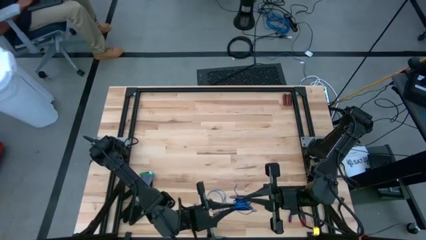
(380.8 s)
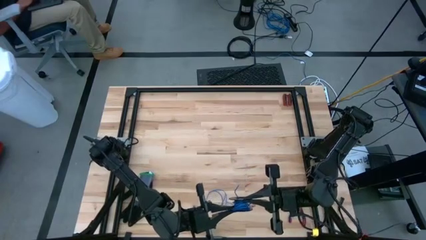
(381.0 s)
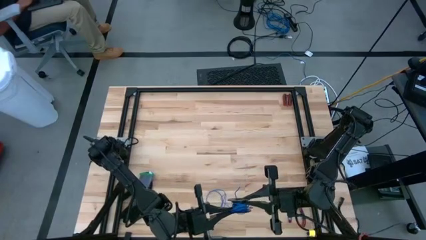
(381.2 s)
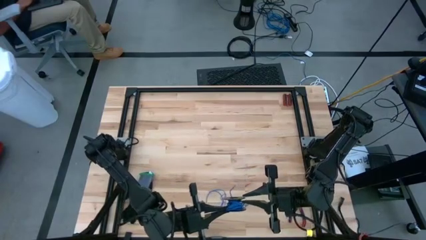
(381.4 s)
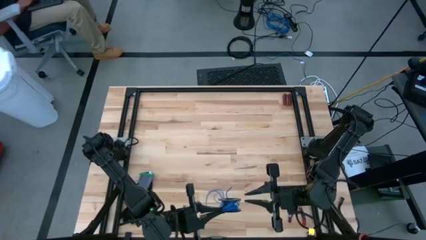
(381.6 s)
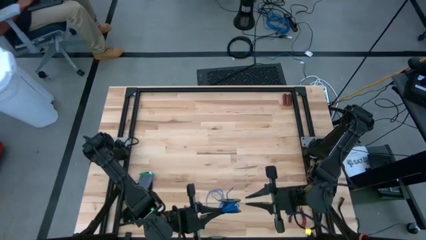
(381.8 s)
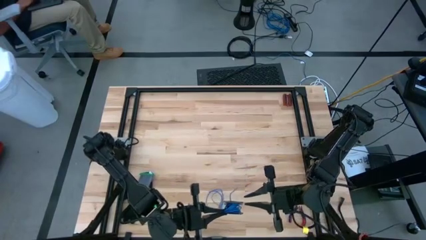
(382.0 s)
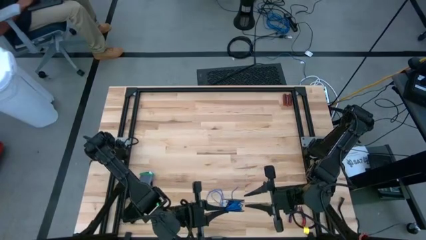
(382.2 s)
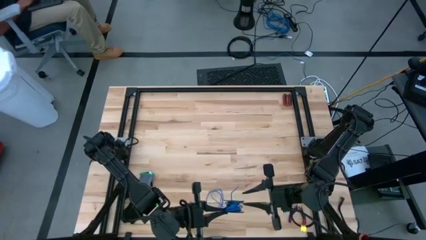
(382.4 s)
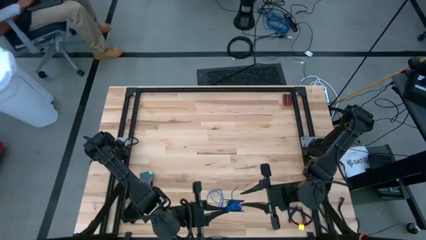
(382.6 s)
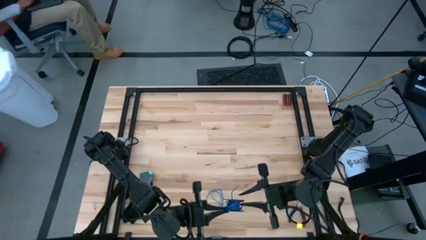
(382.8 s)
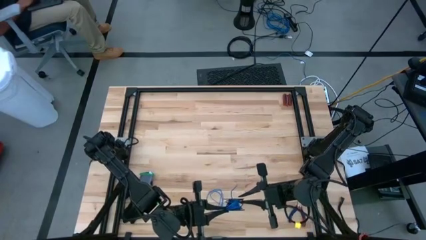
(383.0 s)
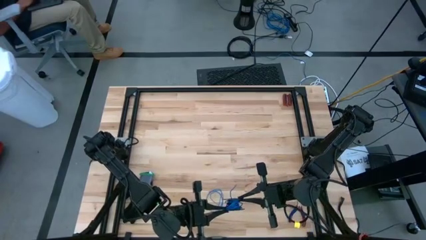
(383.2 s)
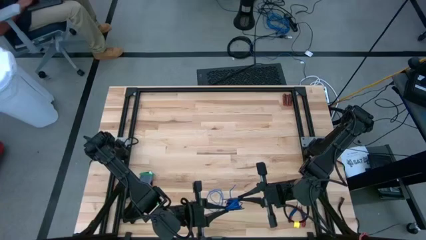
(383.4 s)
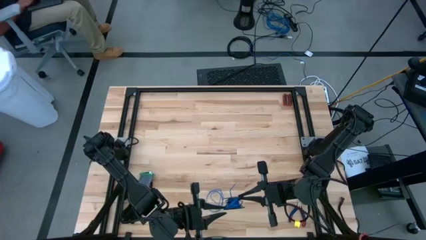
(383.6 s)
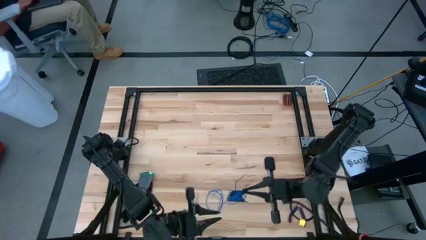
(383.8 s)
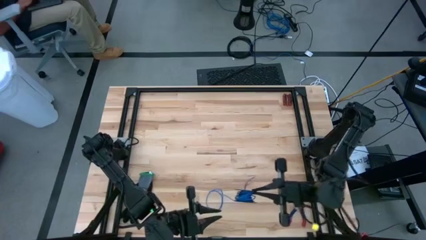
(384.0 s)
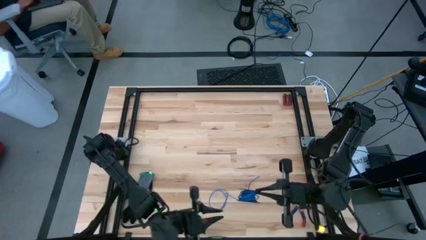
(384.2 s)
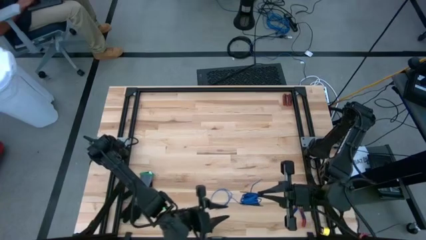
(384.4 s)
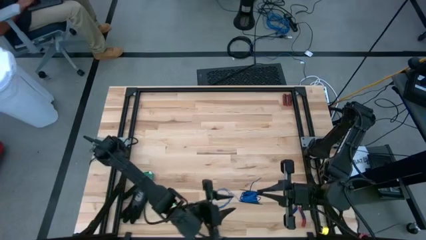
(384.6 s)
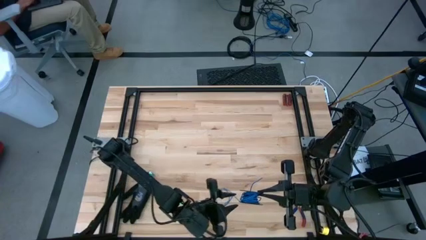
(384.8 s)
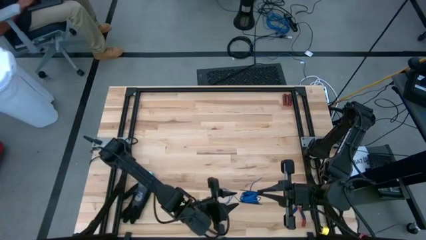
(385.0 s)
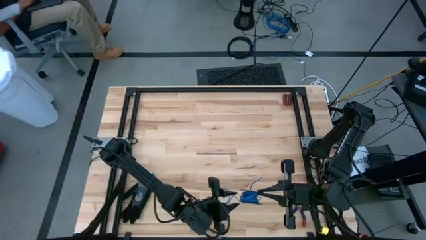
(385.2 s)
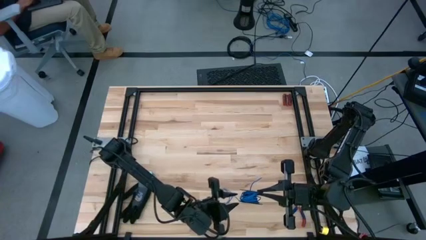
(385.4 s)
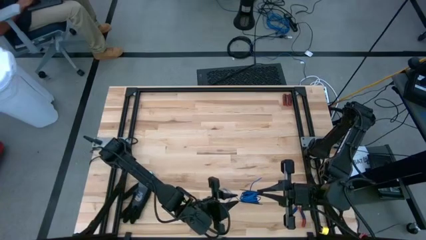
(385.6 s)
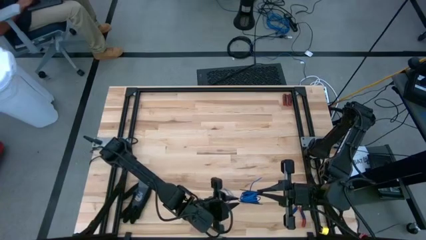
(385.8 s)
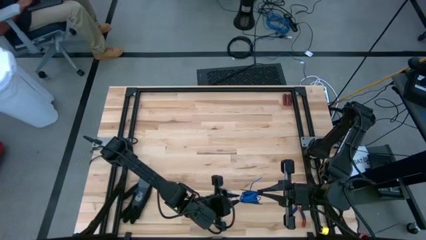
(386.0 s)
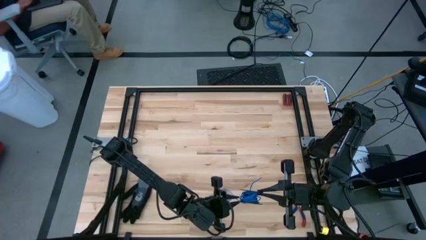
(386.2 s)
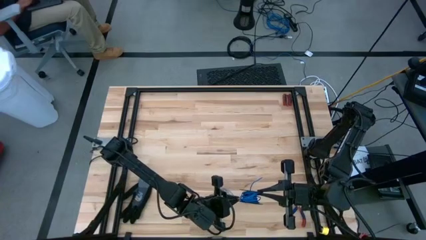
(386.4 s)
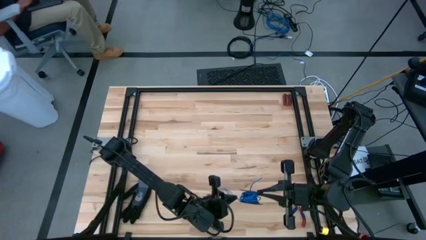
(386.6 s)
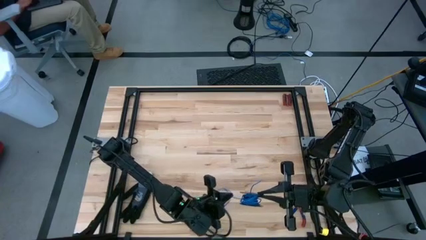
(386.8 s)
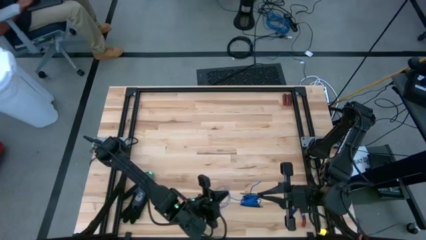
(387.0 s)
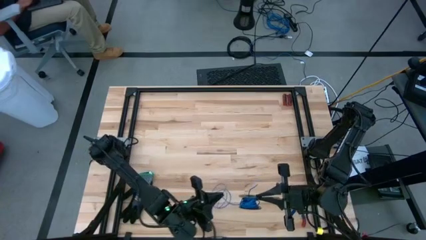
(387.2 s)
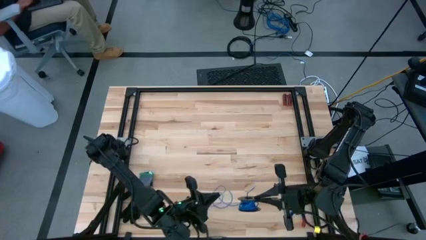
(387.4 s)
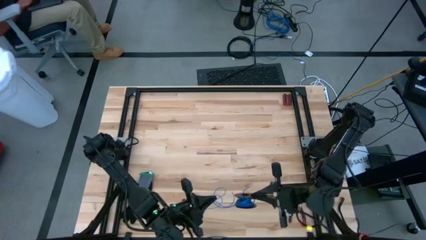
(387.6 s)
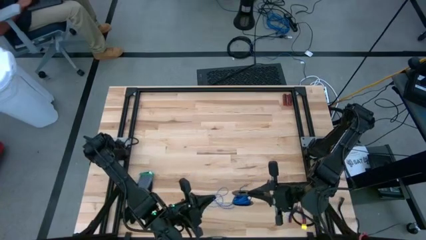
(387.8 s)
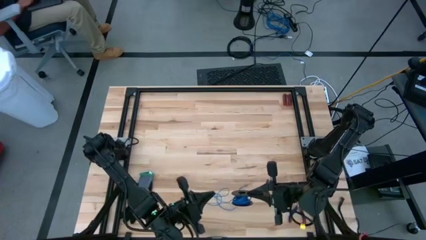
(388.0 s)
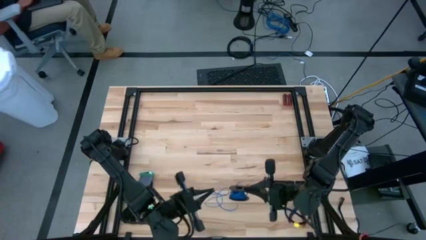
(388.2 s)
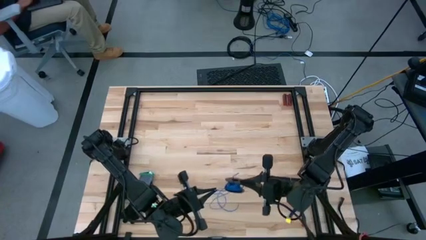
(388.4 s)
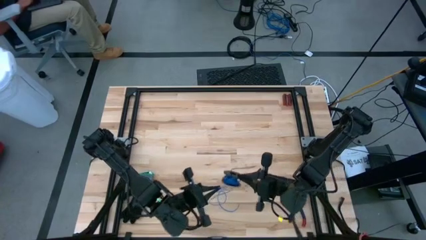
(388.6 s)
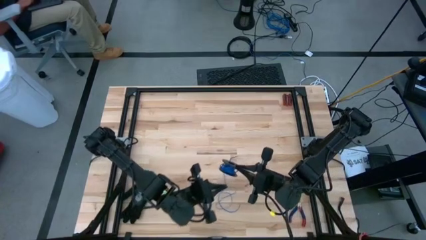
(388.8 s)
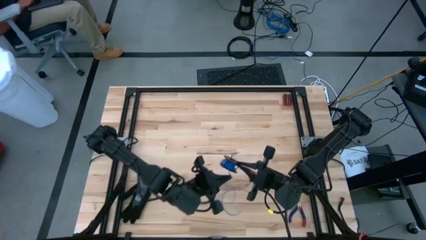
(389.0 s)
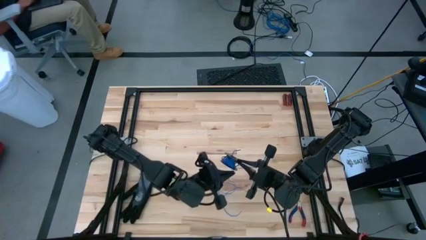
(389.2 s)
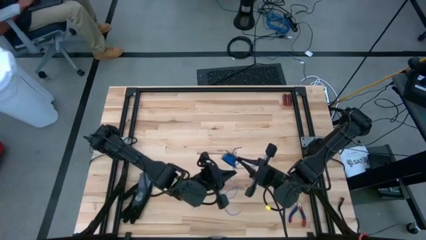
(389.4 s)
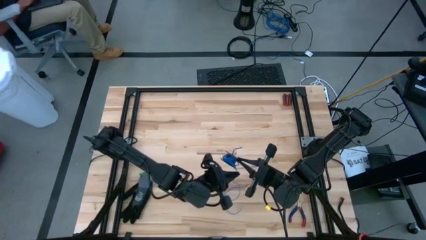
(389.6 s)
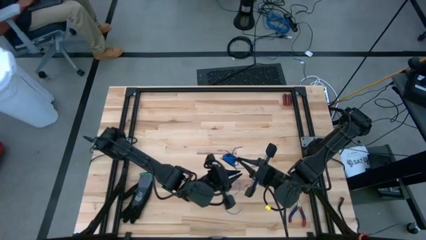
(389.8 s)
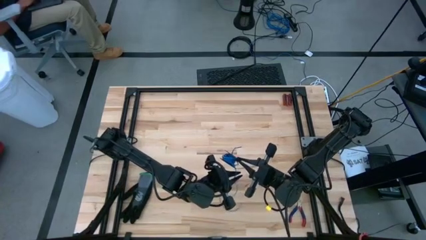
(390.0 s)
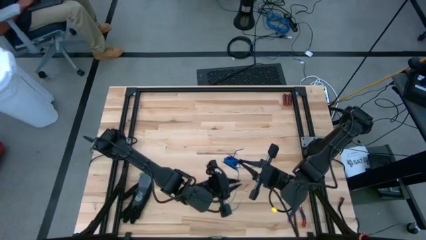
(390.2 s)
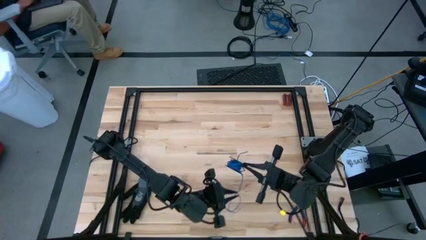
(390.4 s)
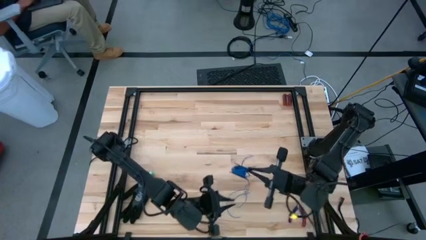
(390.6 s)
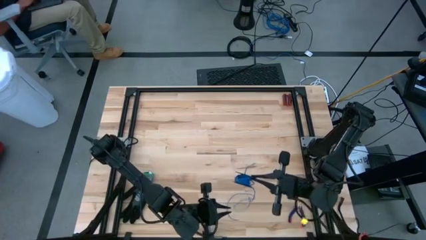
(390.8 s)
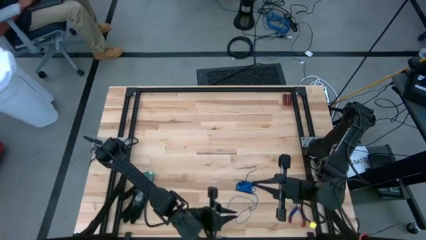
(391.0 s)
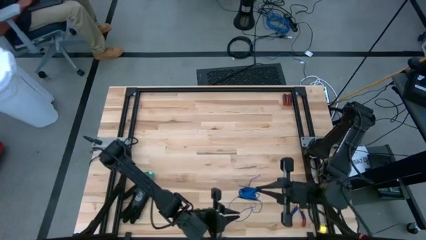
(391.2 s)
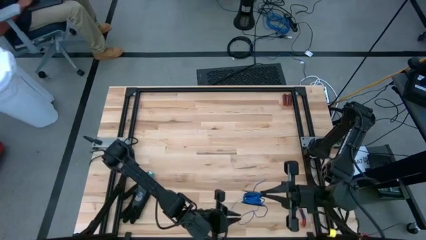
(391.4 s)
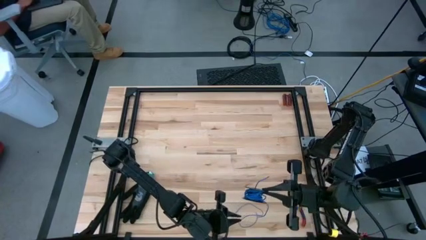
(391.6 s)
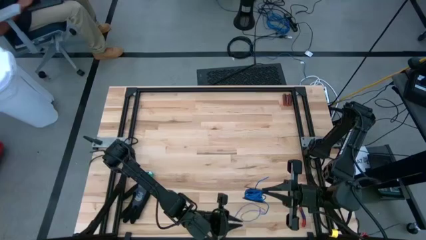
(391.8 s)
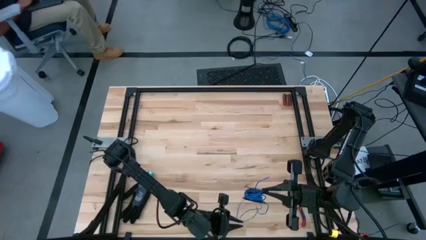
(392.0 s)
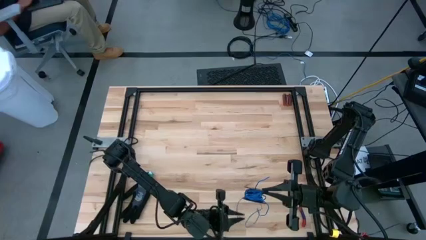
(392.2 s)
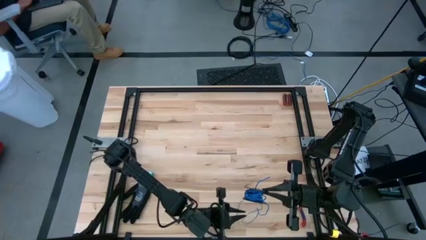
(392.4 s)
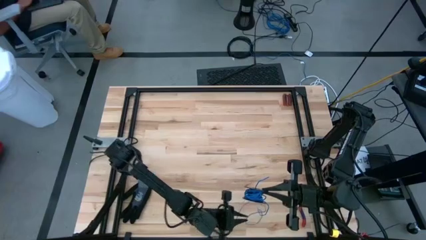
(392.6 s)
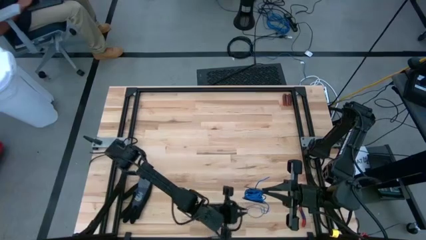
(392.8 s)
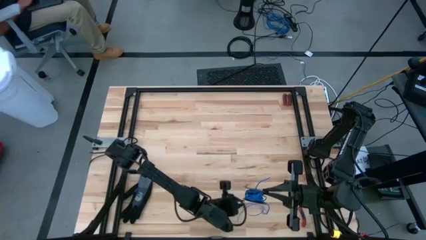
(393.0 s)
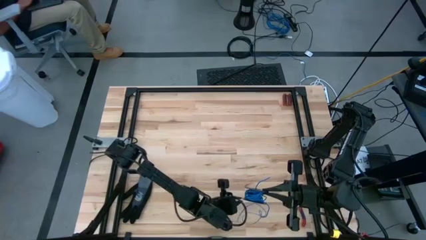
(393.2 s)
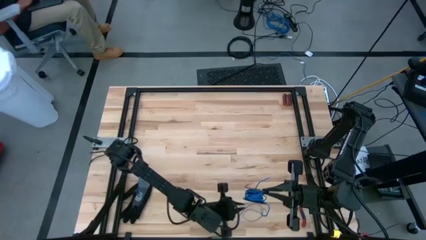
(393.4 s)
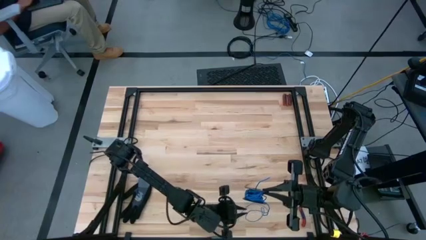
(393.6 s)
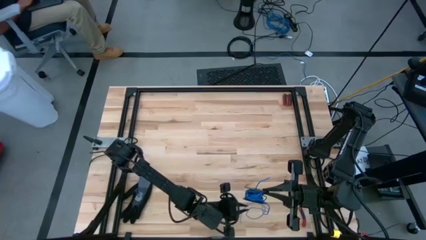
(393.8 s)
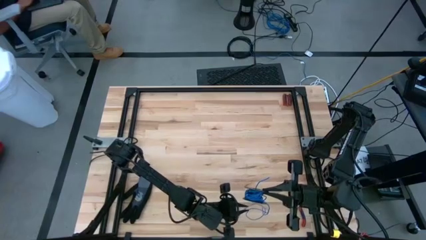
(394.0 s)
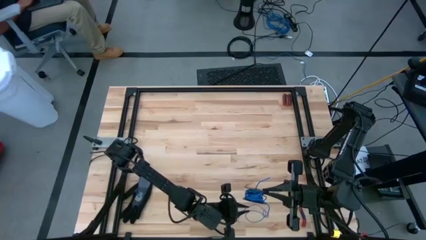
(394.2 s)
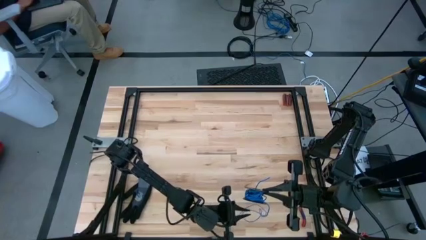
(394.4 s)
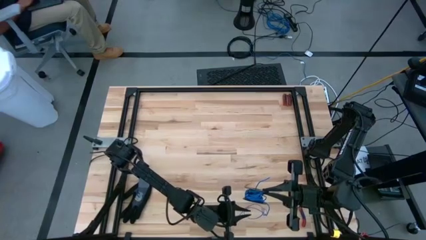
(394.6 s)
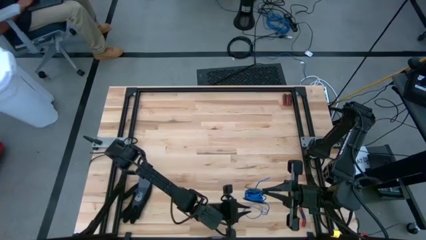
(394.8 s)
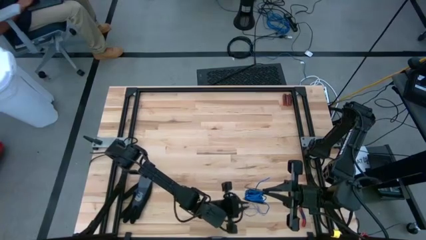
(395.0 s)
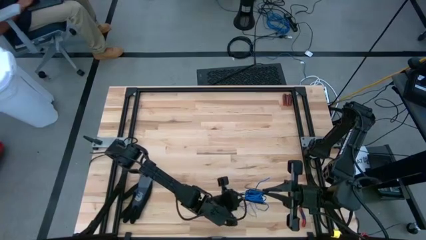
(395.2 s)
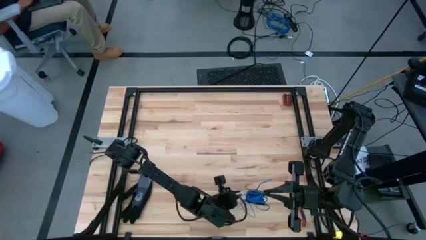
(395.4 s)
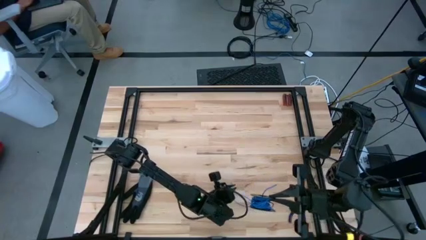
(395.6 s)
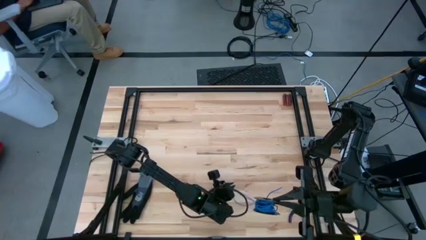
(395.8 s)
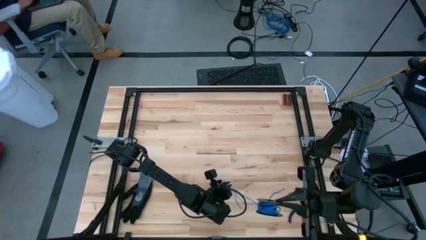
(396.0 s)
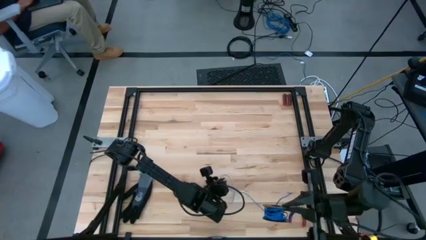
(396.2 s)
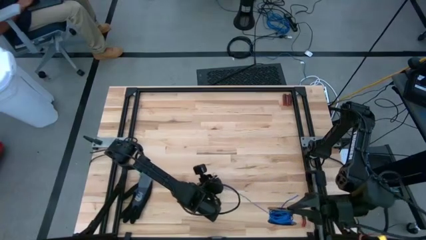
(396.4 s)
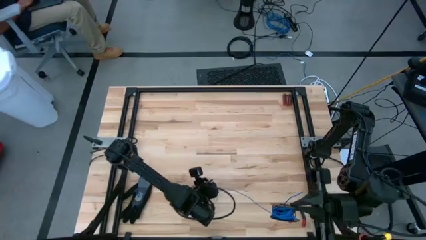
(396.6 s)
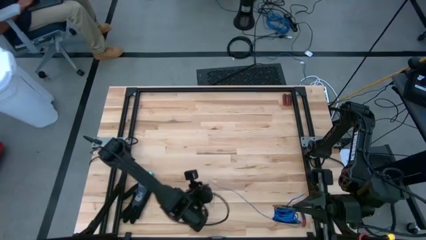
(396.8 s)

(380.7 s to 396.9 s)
Task: Coil cords
Coil the blue wire onto the spool
